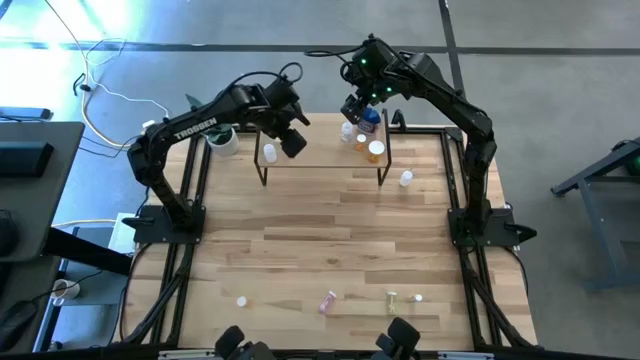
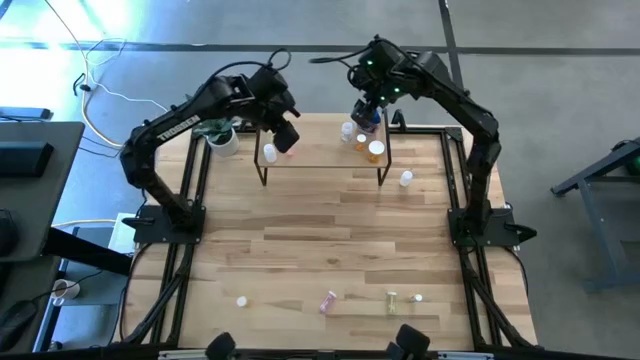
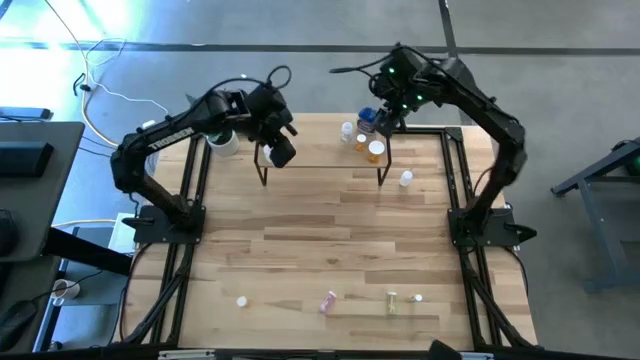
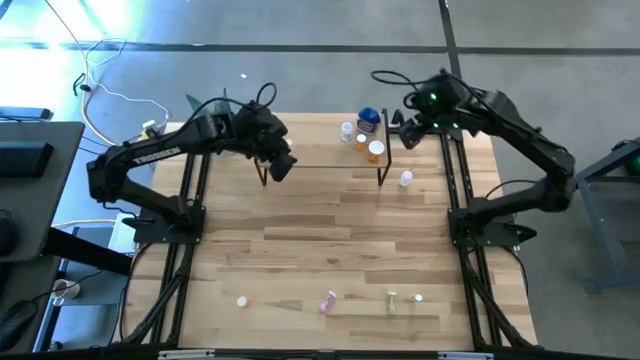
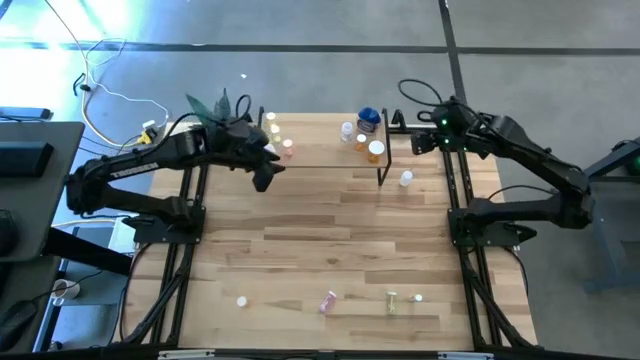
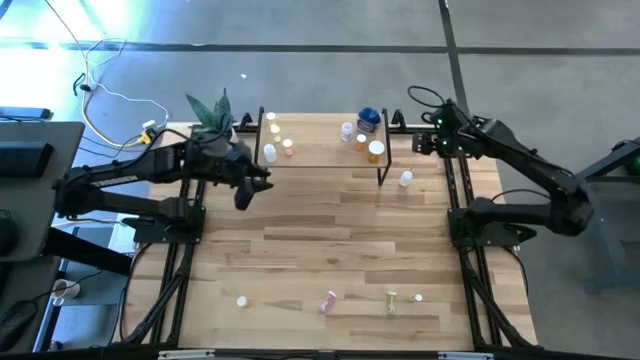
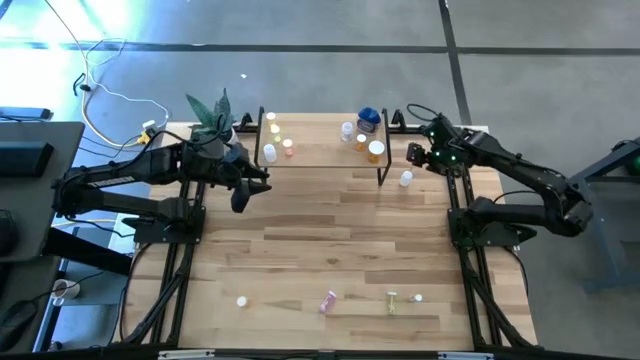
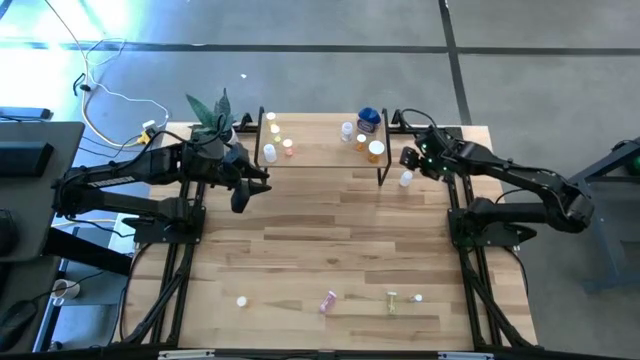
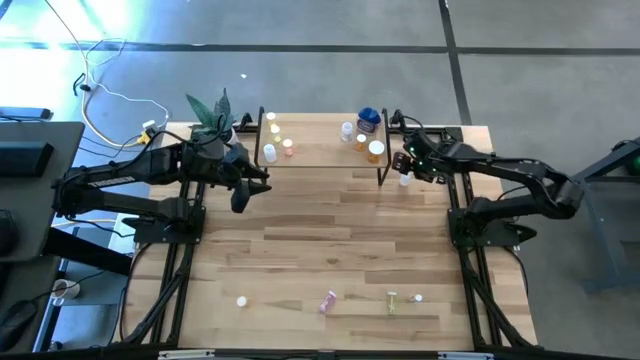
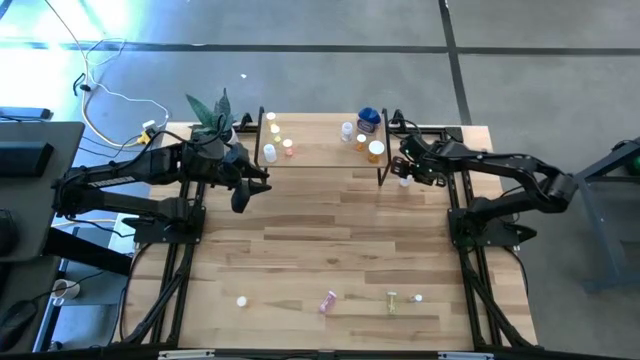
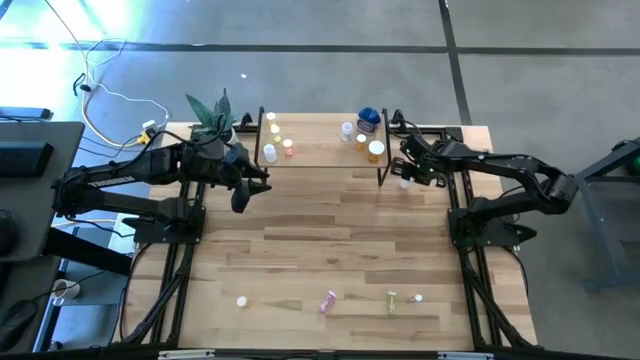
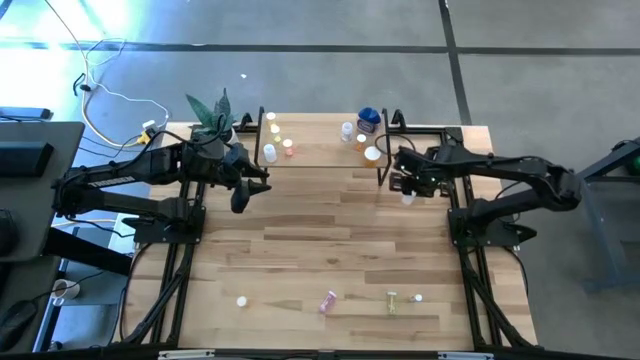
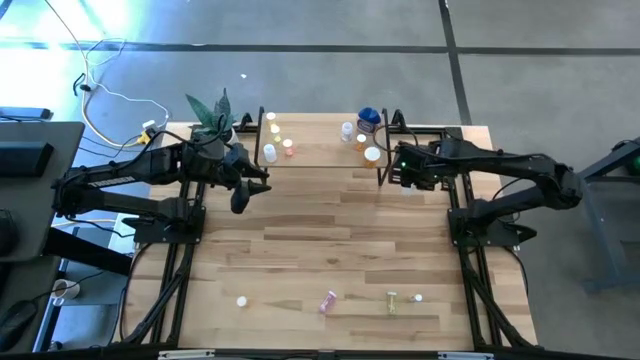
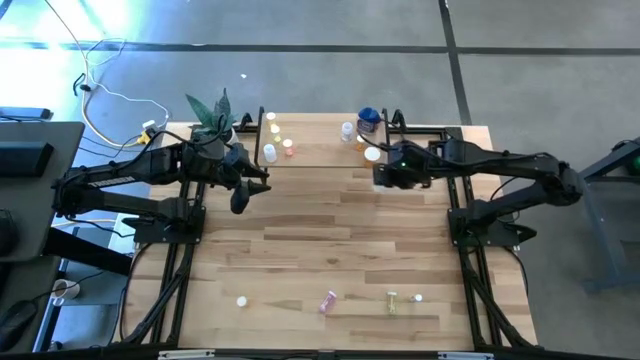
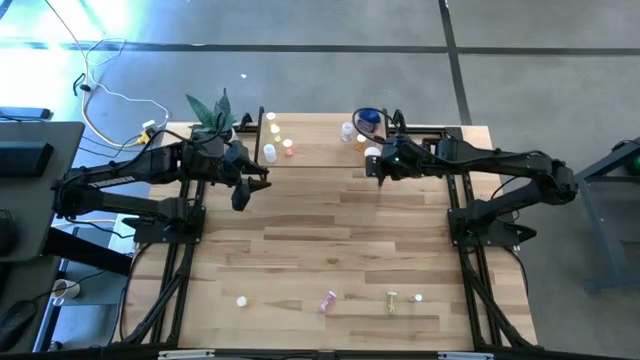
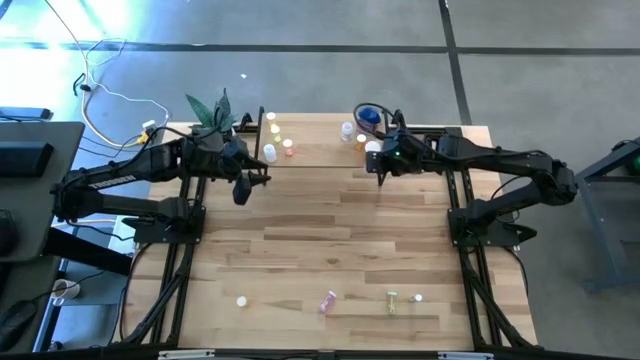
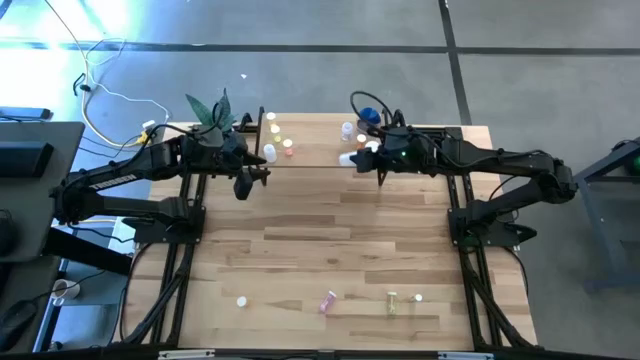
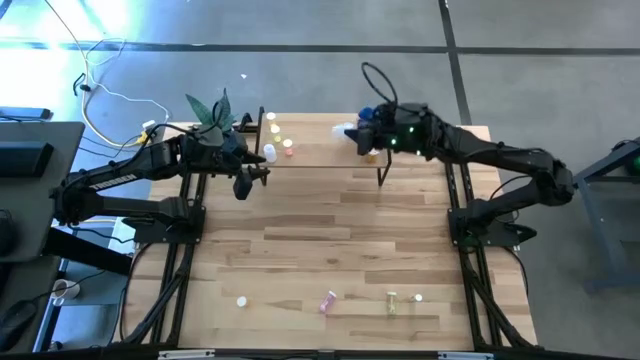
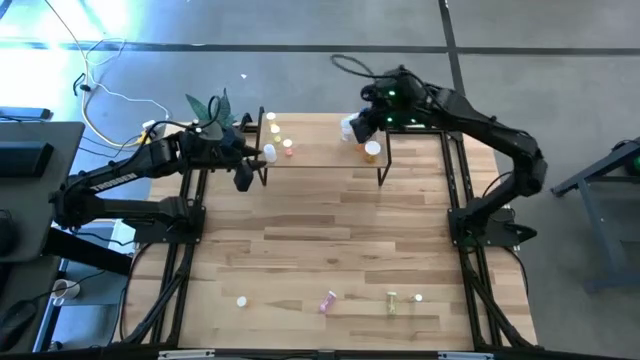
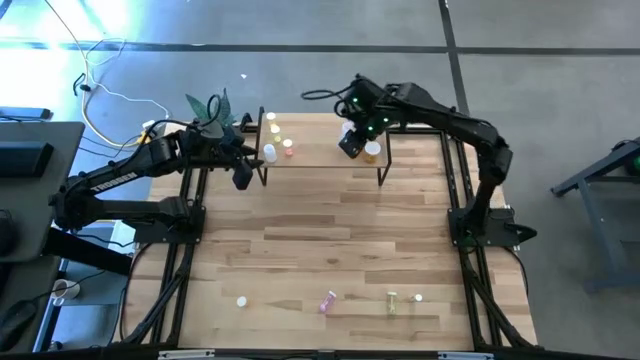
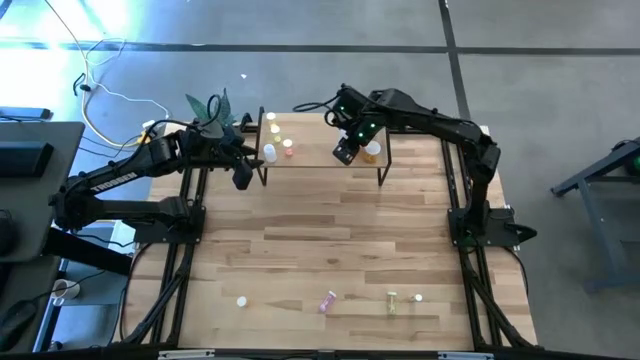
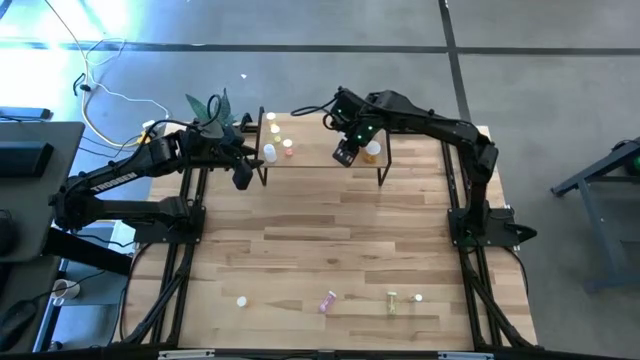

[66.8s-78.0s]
Task: Pick and place medicine bottles onto shelf by color
Put the small transparent pill bottle on the shelf

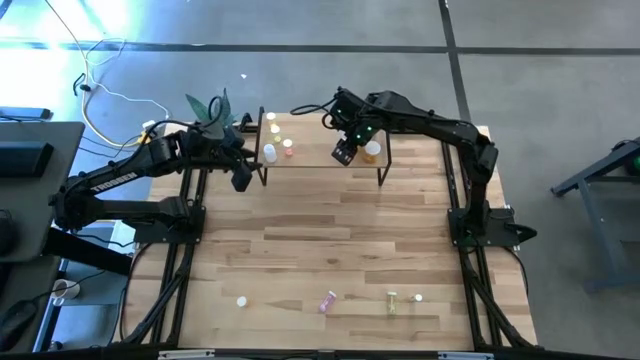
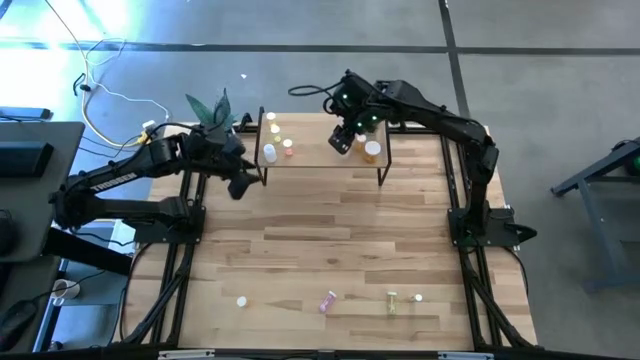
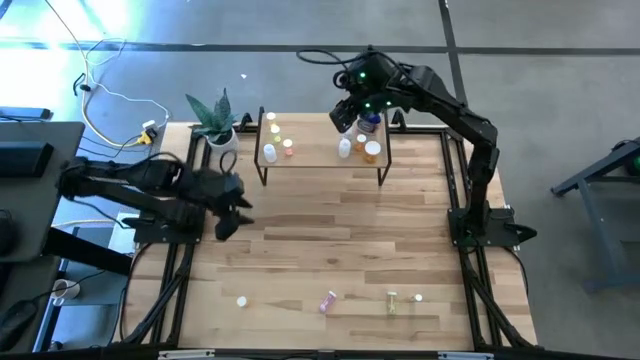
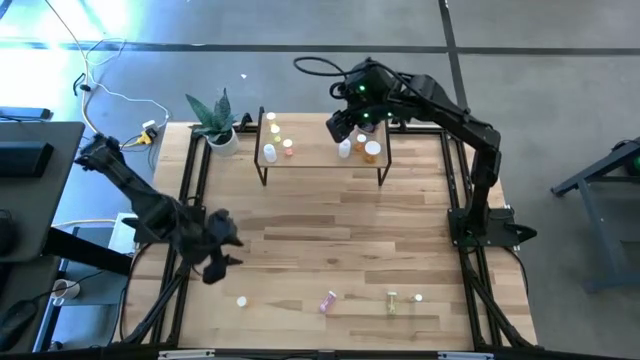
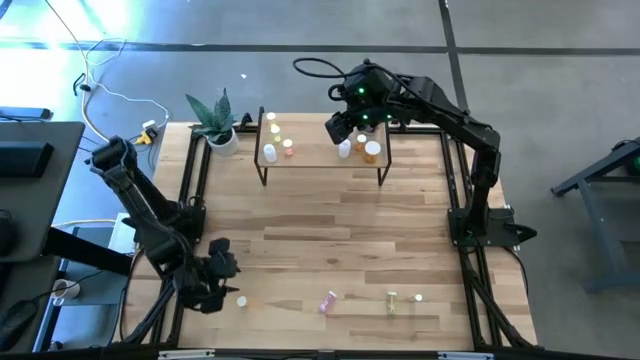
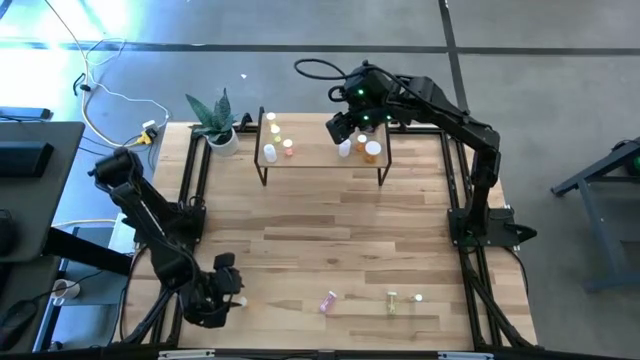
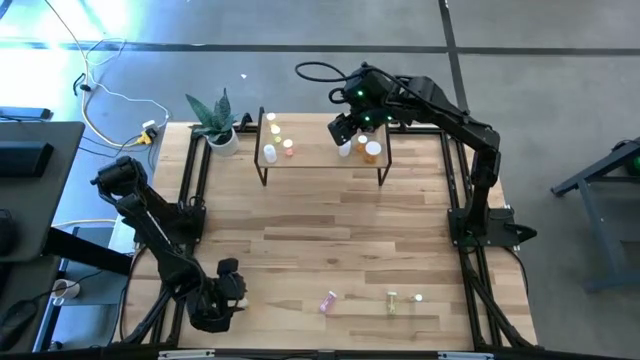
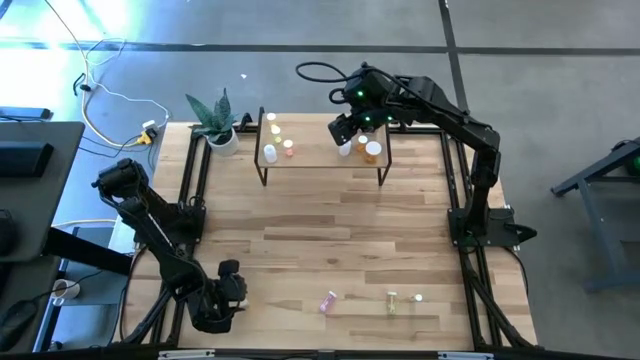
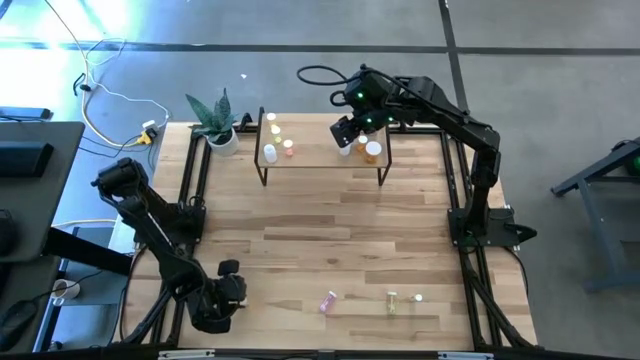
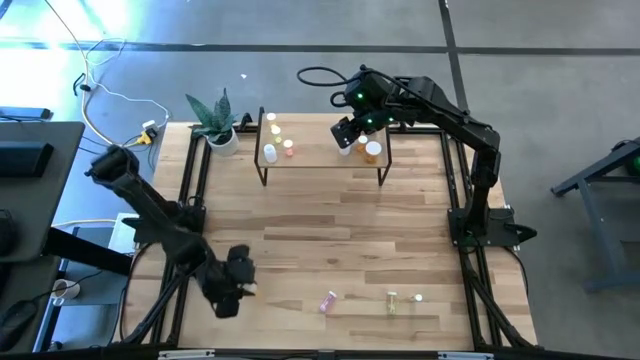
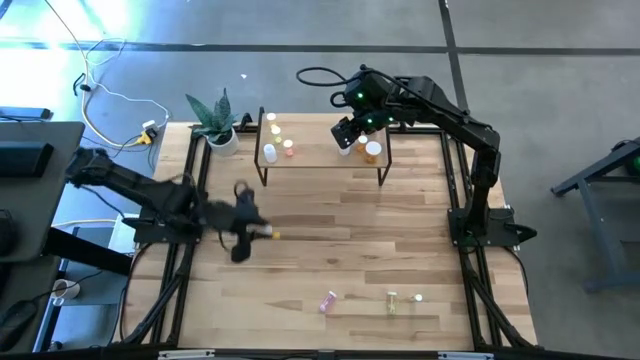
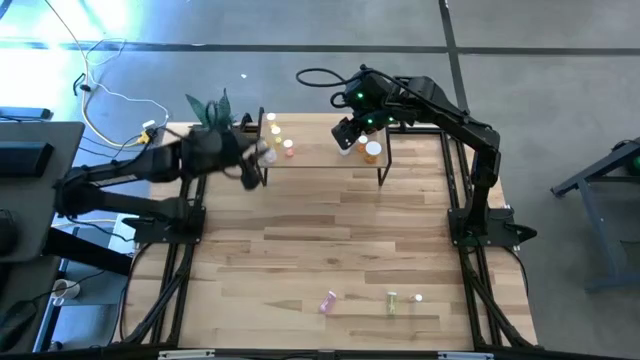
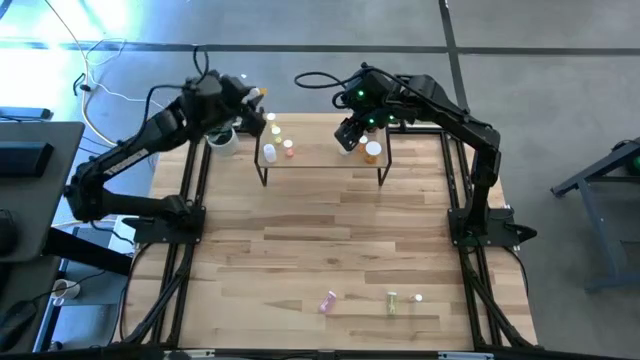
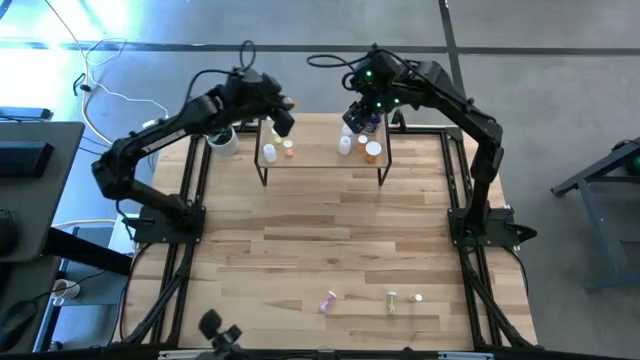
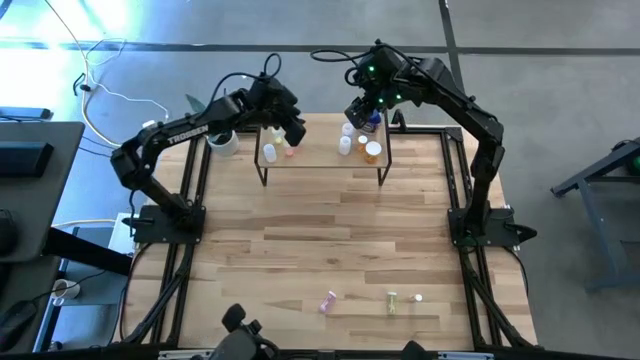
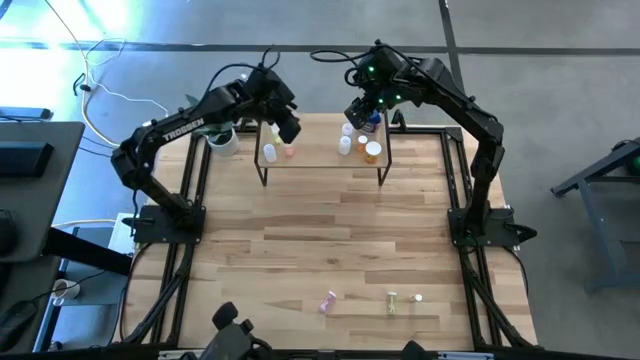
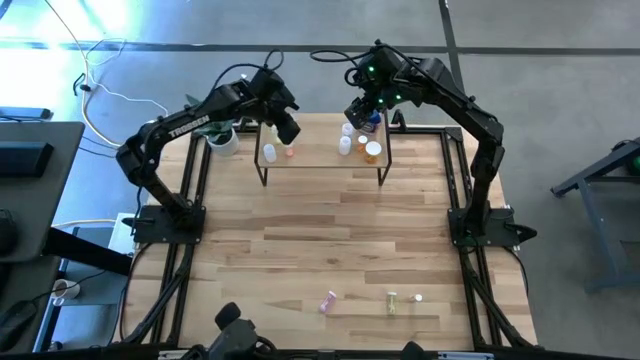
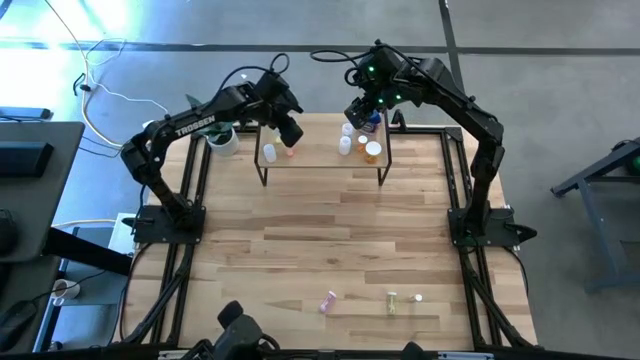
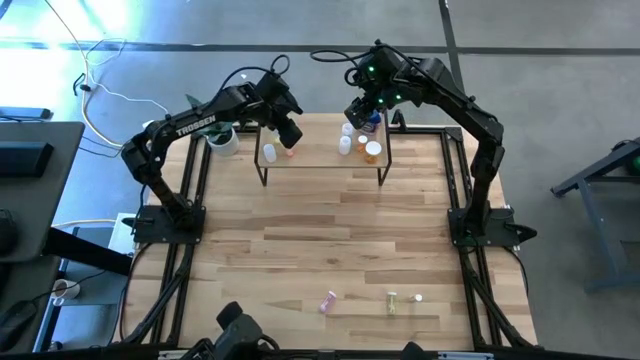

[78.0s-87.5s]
Put the small orange pill bottle on the shelf

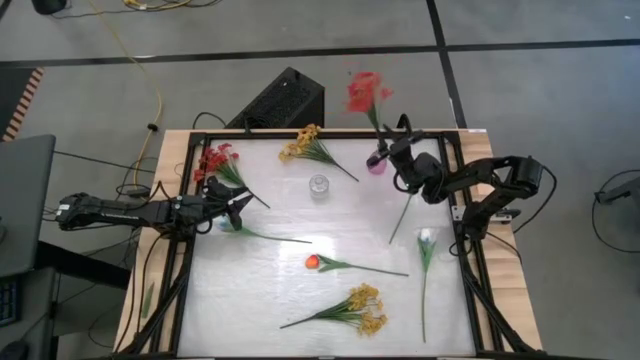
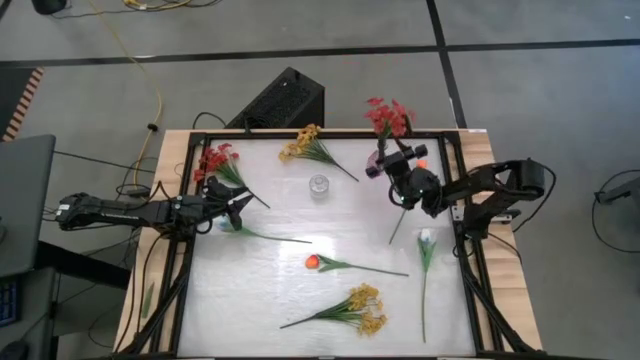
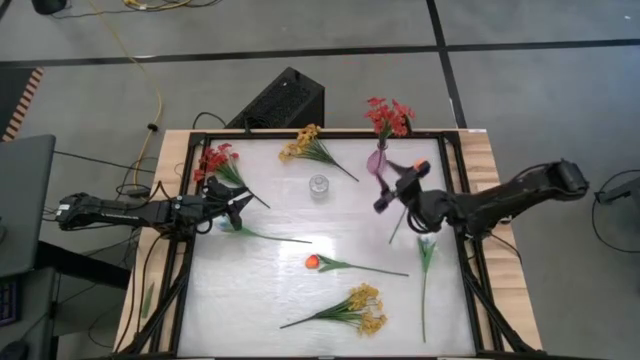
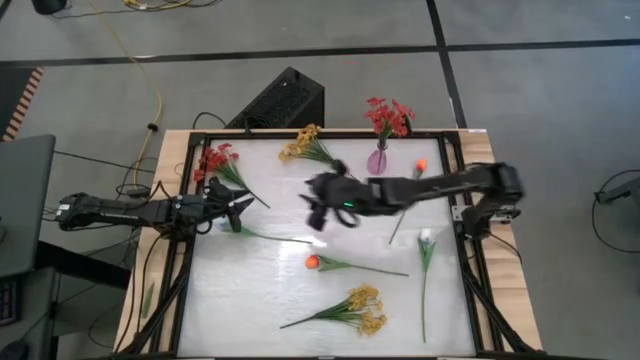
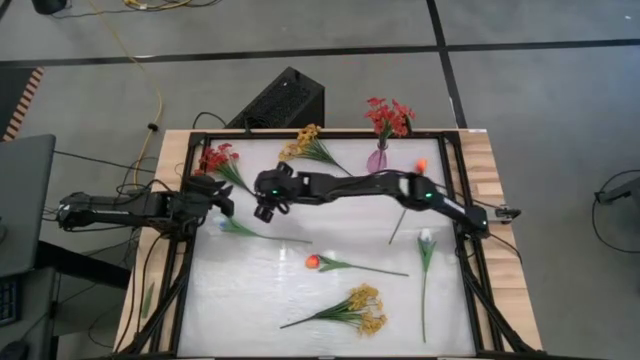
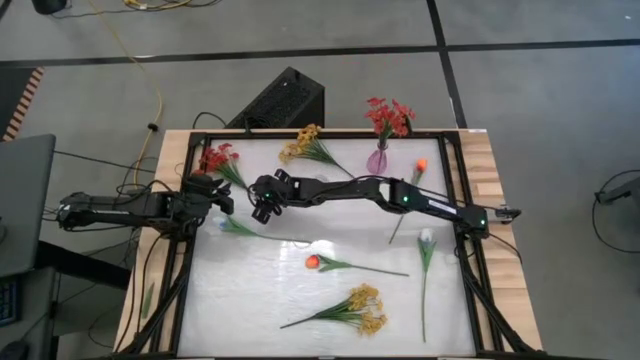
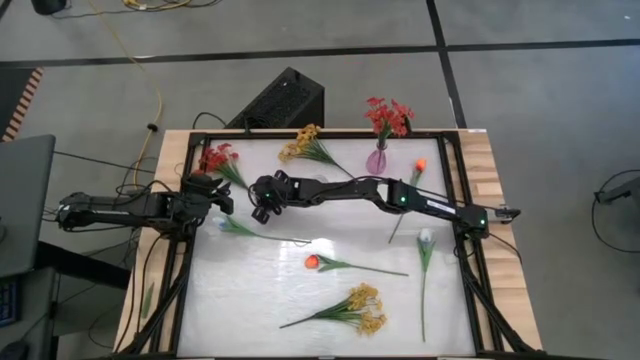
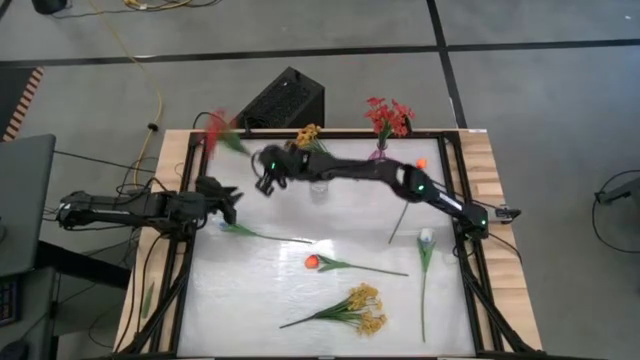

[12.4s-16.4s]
Task: Sort flowers into vase by color
Put the red flower into the pink flower vase
